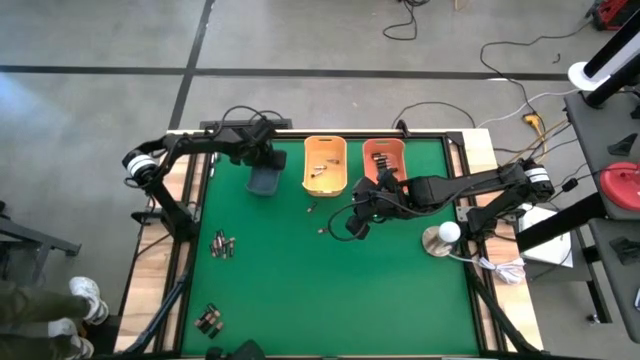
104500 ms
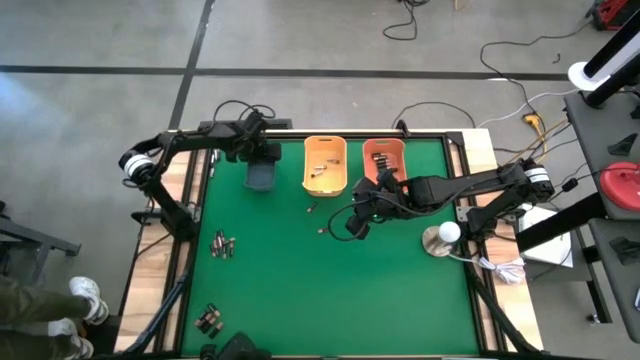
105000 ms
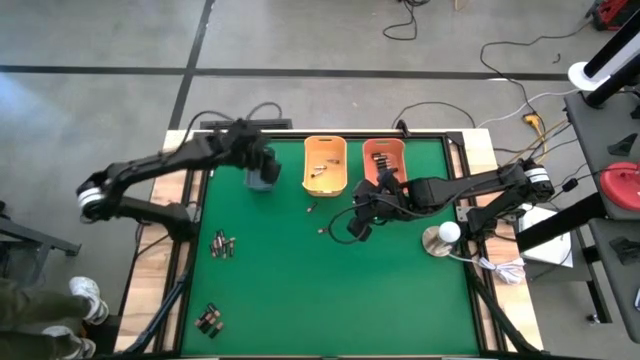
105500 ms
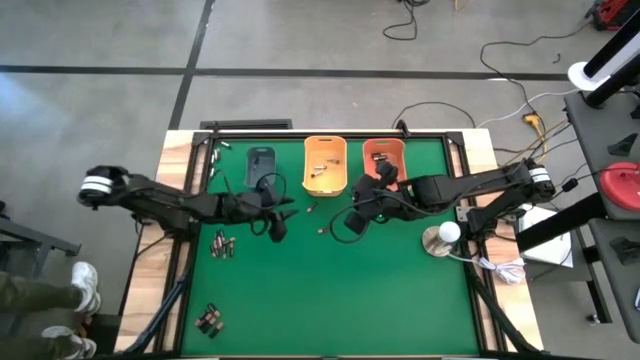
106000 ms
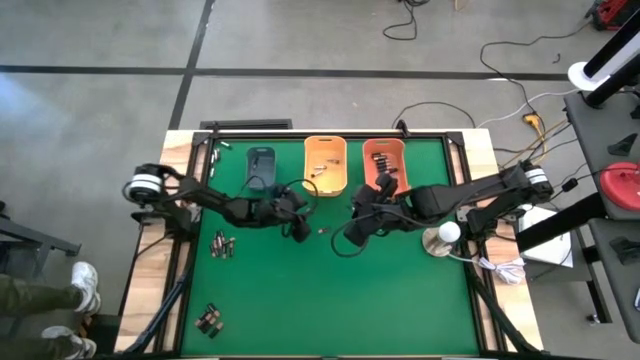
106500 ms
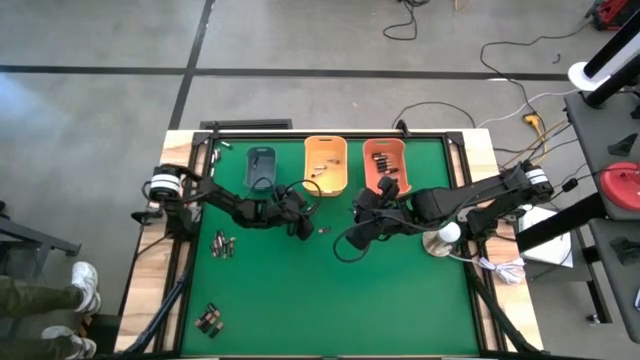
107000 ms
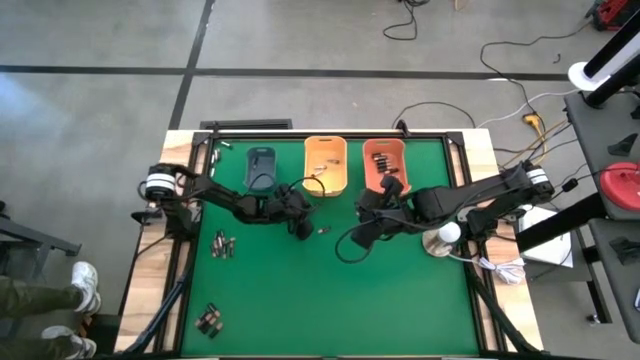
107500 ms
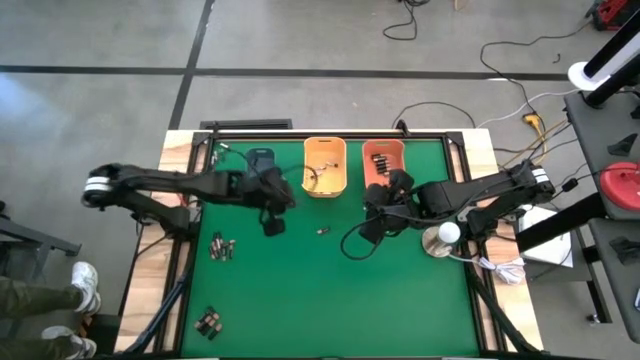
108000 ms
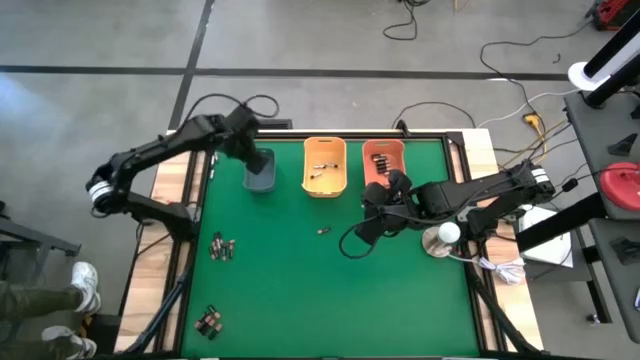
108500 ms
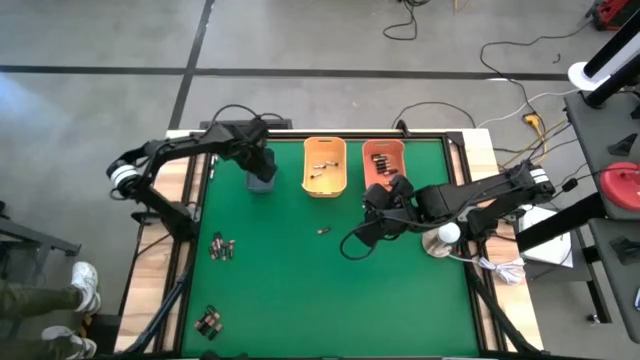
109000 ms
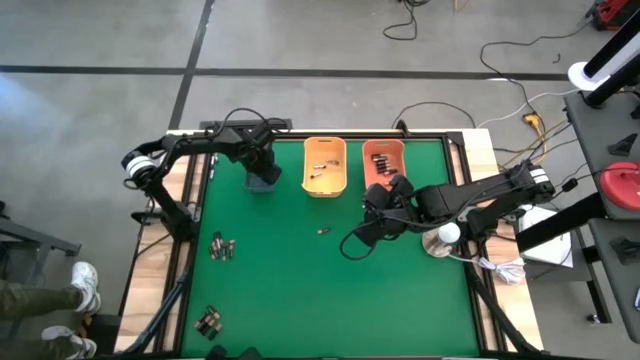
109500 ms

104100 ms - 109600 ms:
Task: Sort batteries
Put the gold battery into the blue bin

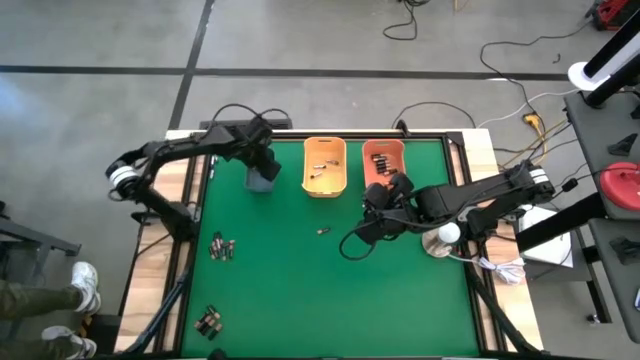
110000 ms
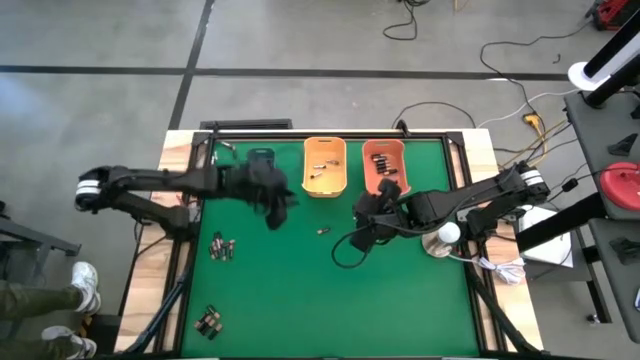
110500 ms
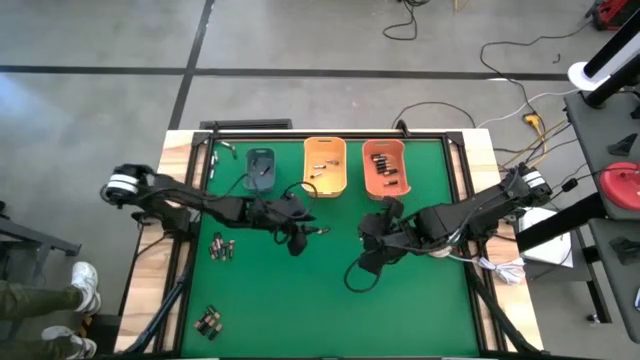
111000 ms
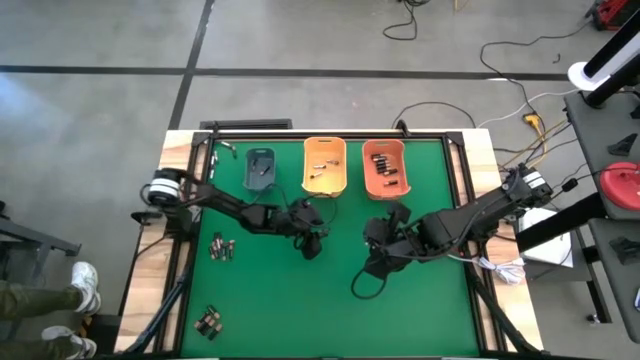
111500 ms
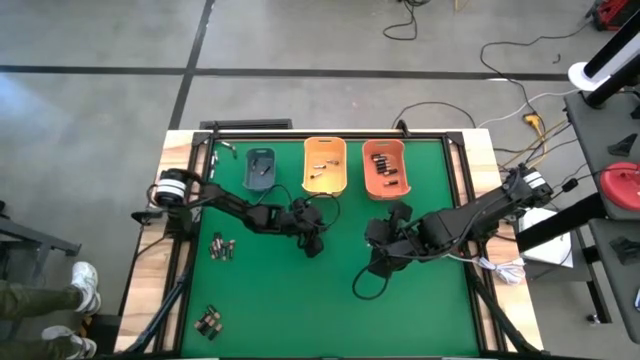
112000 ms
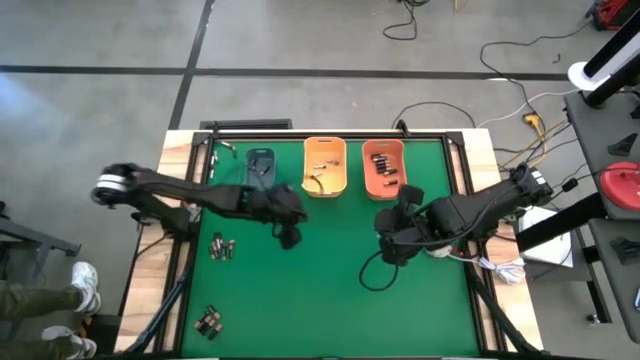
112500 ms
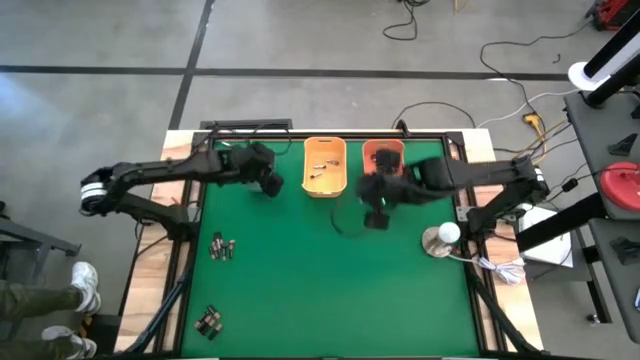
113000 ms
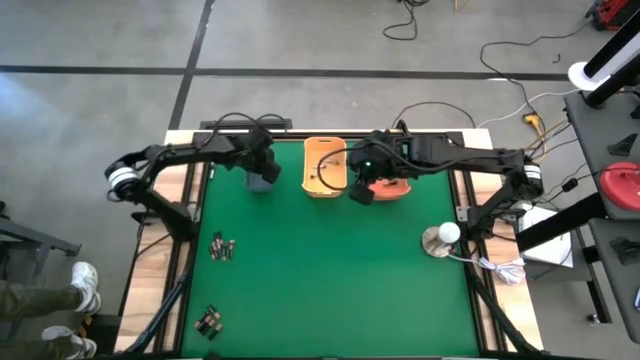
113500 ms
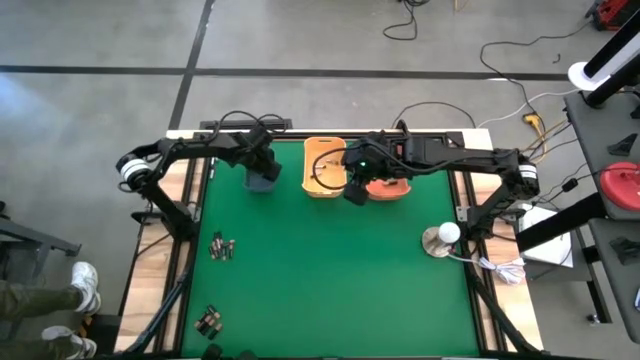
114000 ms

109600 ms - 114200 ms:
Put the gold battery into the blue bin

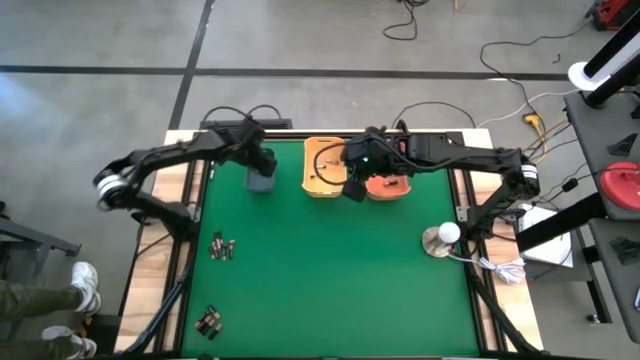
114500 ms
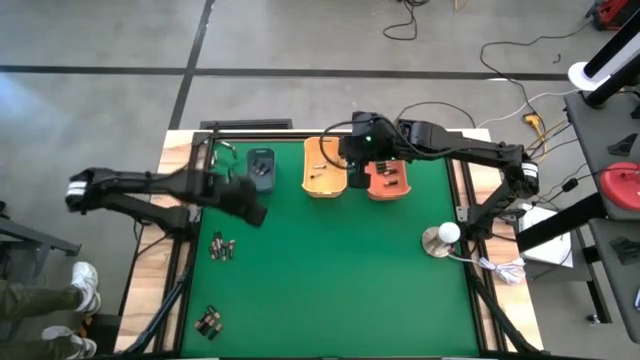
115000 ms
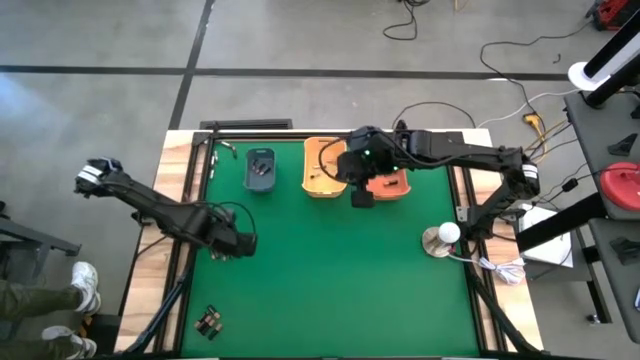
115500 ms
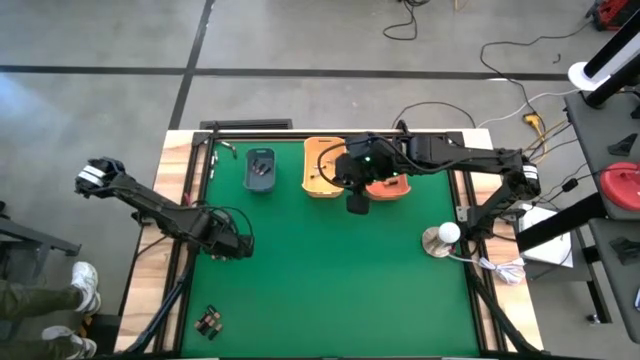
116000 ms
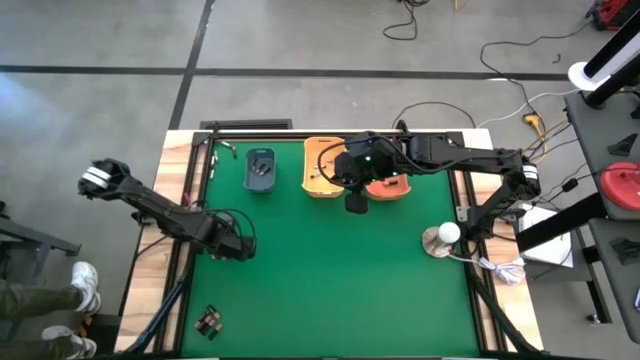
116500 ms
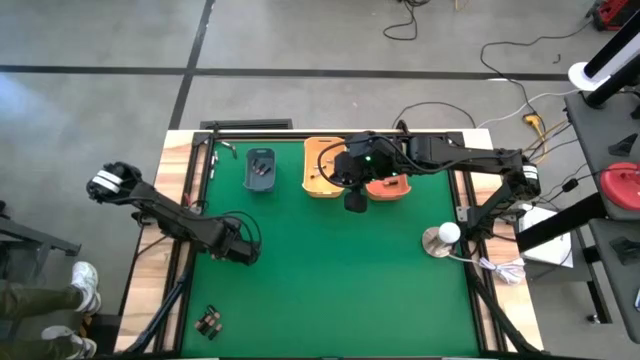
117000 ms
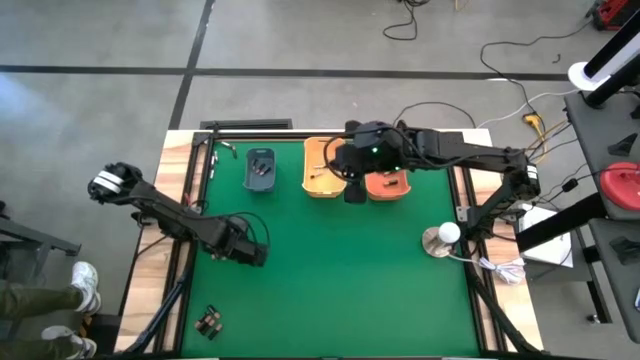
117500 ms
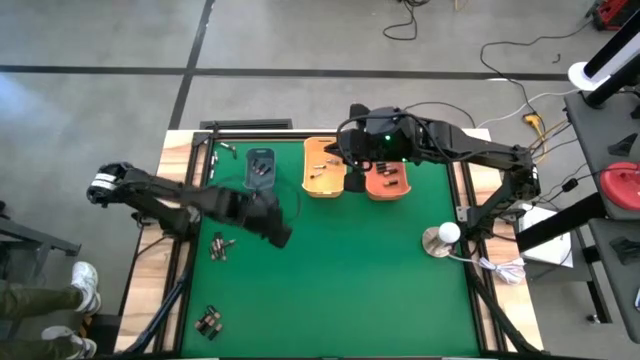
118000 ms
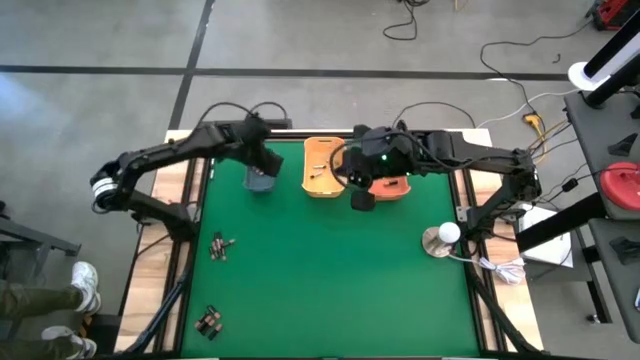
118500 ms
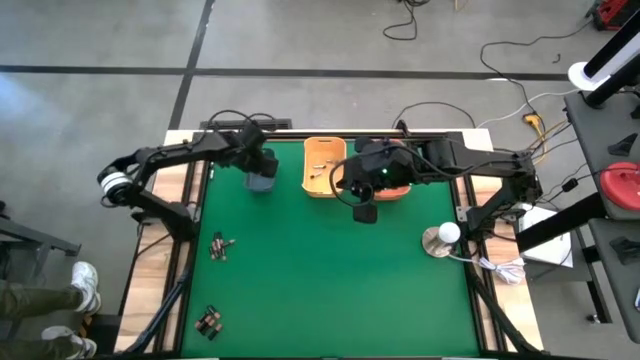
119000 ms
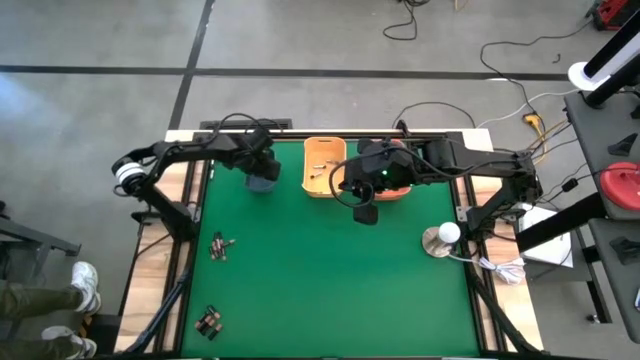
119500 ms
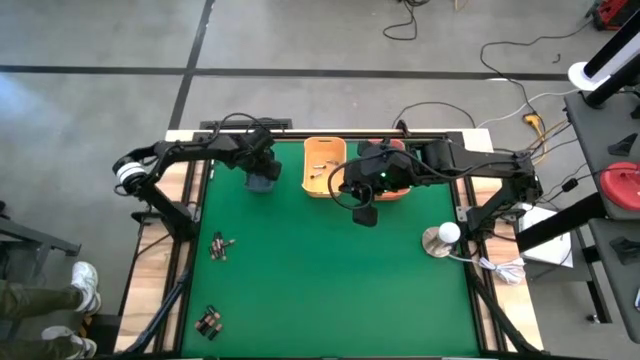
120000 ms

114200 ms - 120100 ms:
Put the gold/black battery into the blue bin

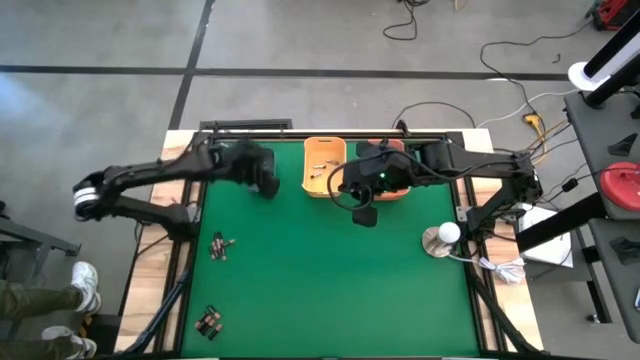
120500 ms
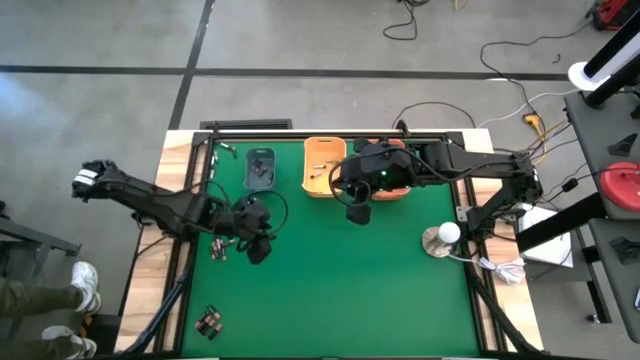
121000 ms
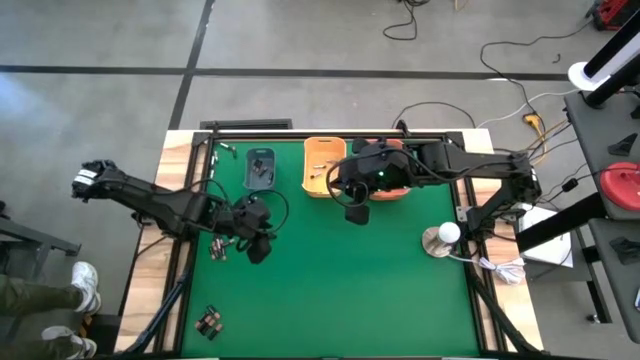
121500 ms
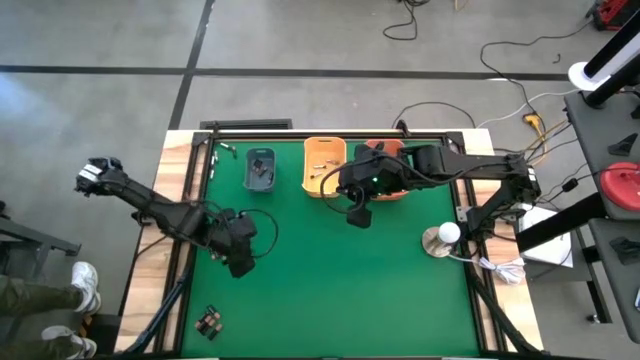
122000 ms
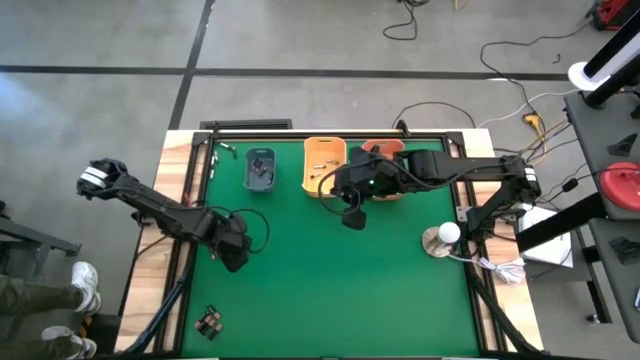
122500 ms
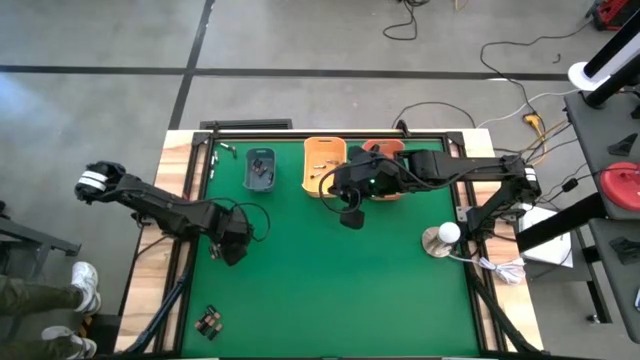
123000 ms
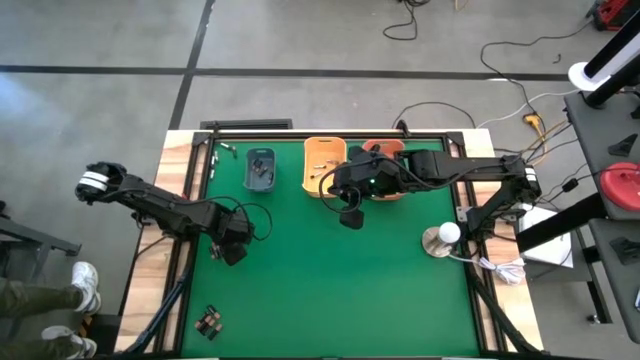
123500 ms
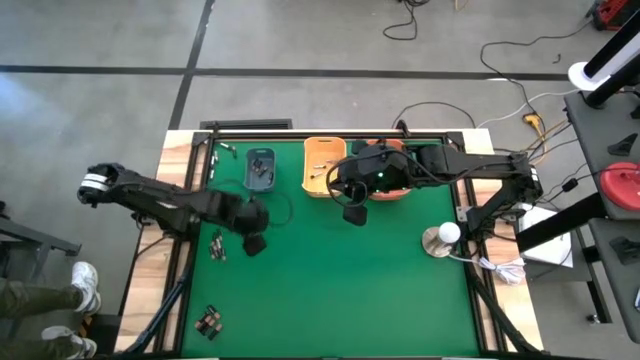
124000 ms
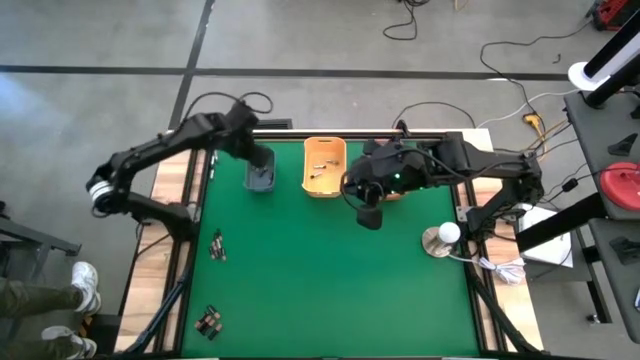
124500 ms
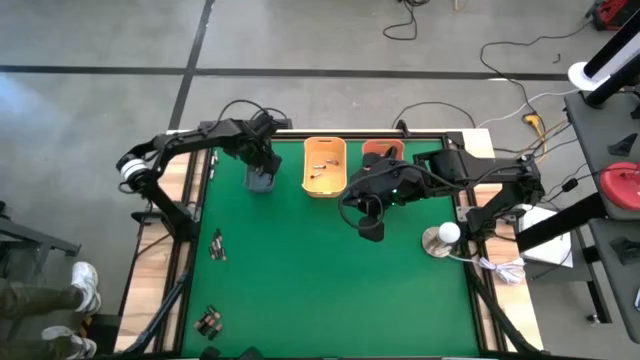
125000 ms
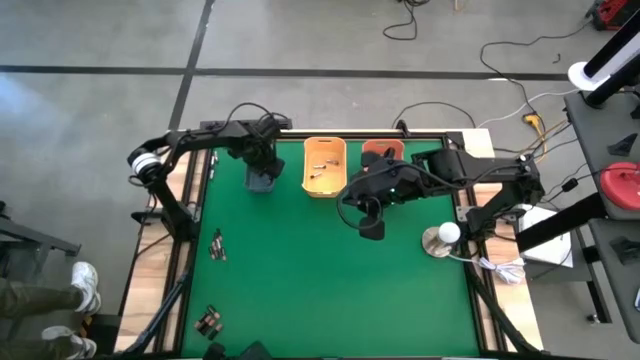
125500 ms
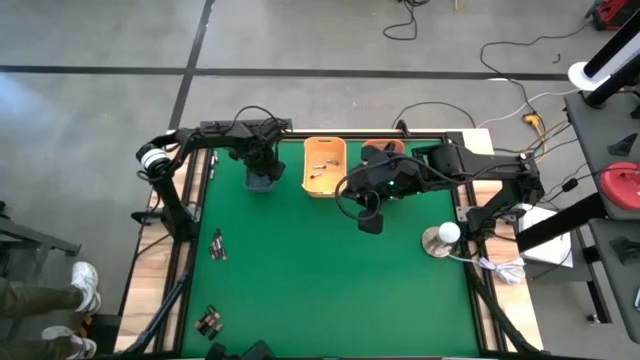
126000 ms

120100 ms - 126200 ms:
Put the black battery into the blue bin
